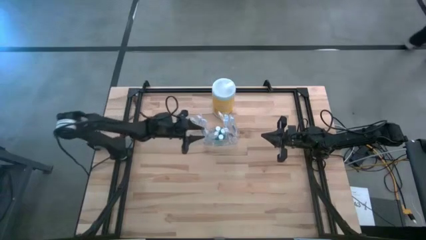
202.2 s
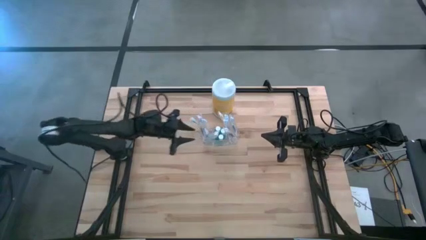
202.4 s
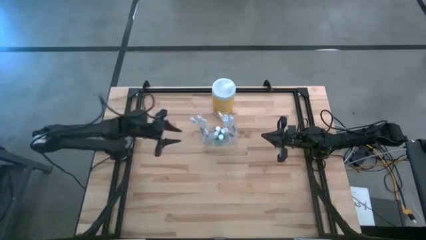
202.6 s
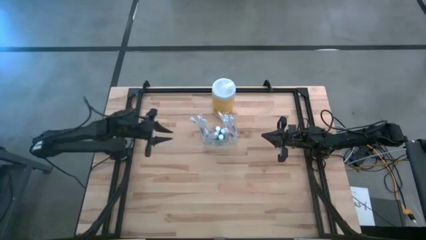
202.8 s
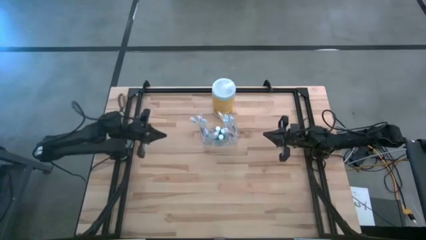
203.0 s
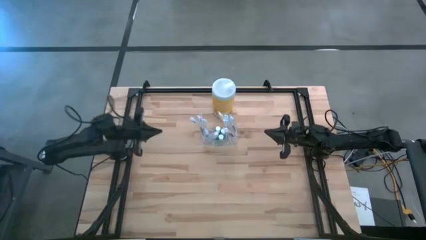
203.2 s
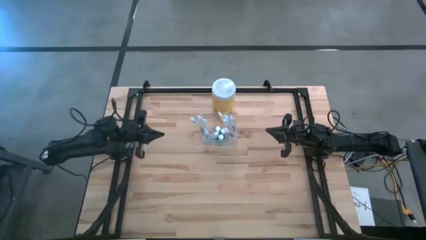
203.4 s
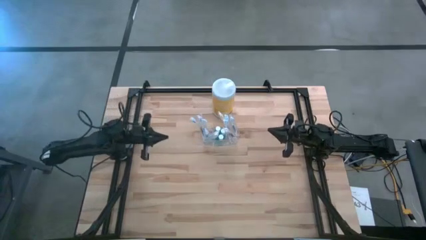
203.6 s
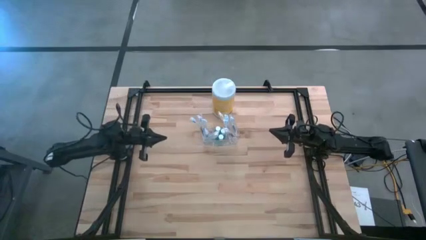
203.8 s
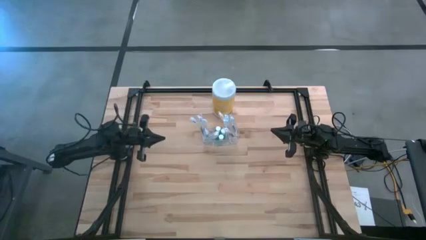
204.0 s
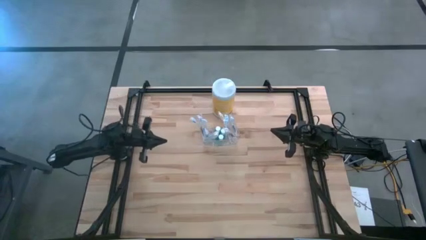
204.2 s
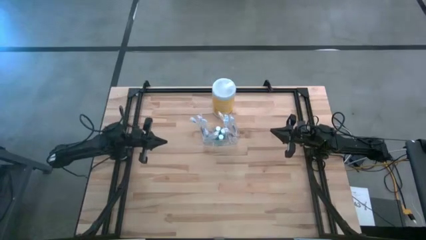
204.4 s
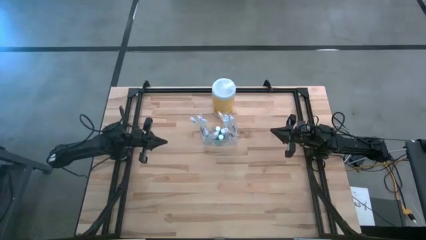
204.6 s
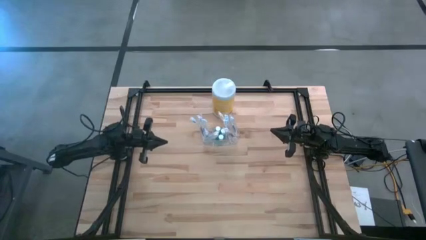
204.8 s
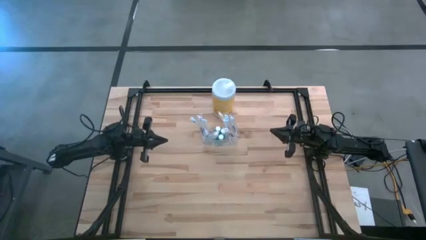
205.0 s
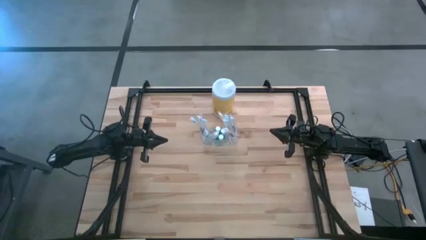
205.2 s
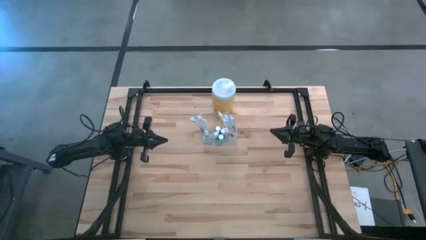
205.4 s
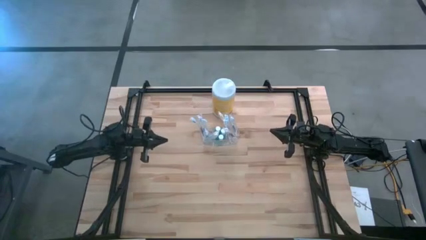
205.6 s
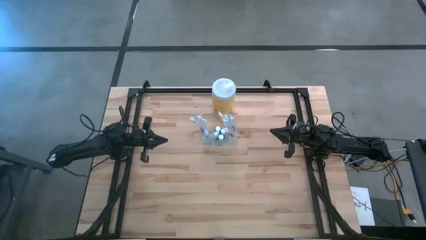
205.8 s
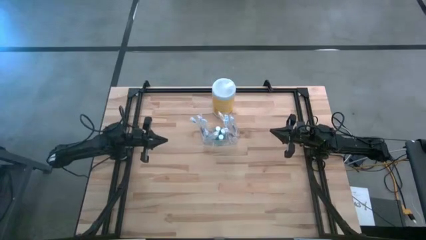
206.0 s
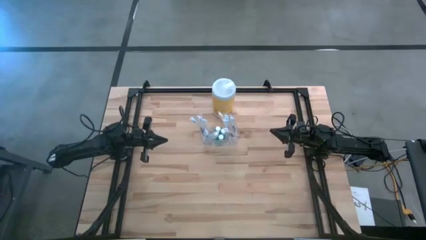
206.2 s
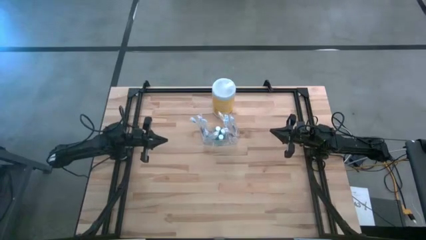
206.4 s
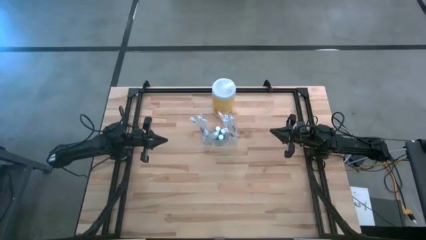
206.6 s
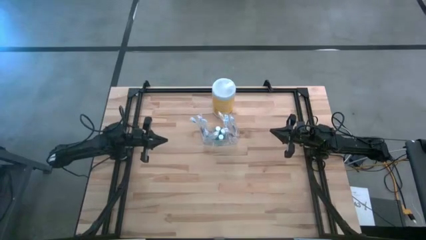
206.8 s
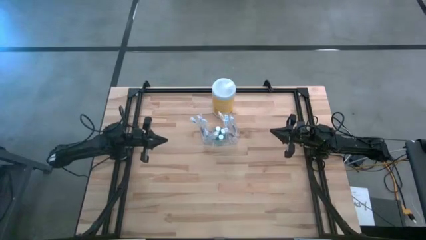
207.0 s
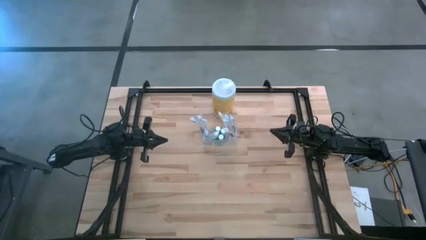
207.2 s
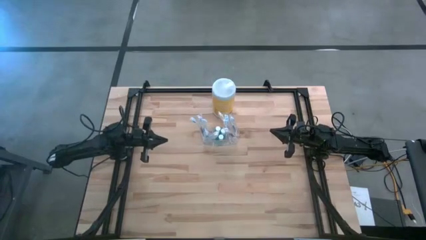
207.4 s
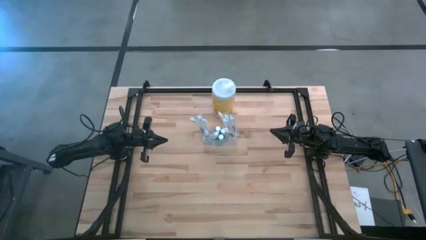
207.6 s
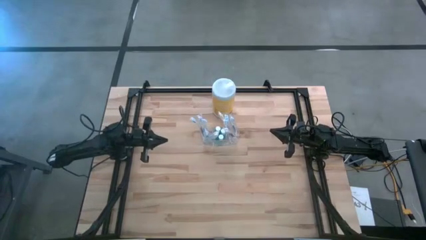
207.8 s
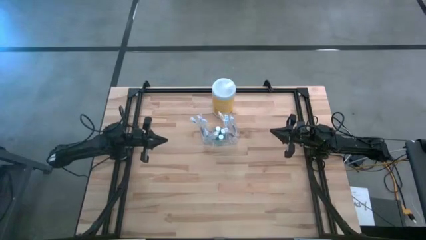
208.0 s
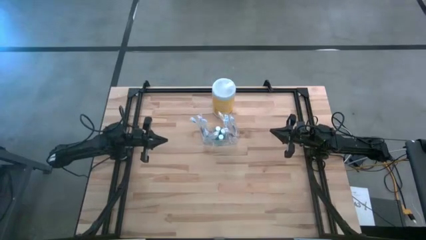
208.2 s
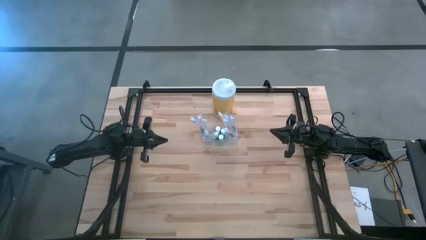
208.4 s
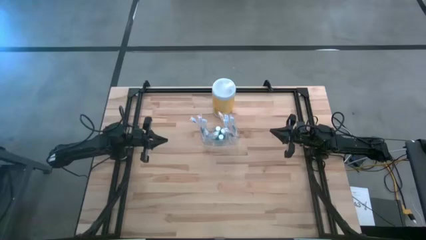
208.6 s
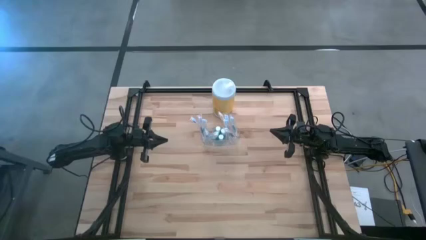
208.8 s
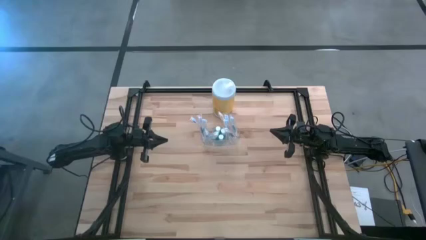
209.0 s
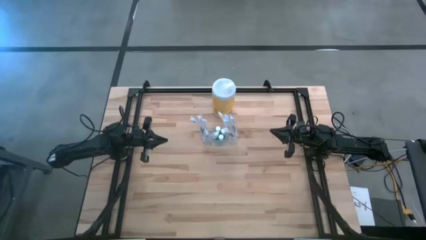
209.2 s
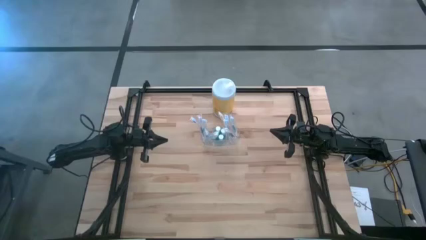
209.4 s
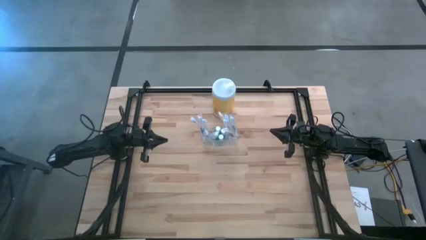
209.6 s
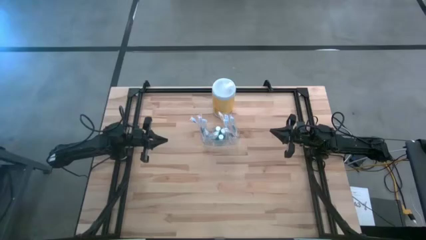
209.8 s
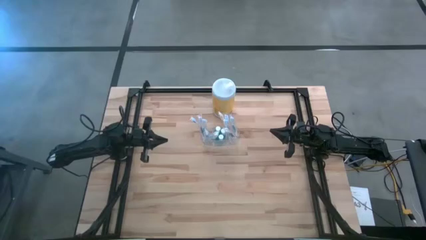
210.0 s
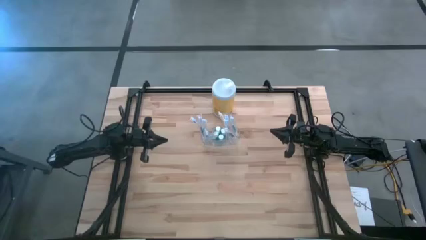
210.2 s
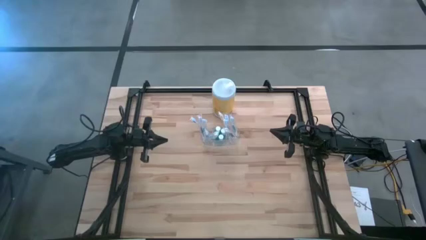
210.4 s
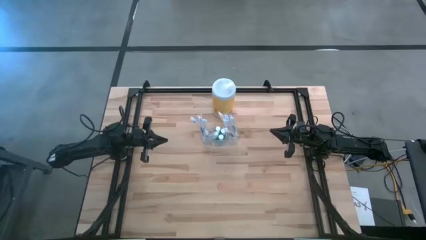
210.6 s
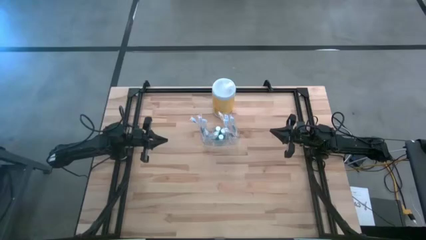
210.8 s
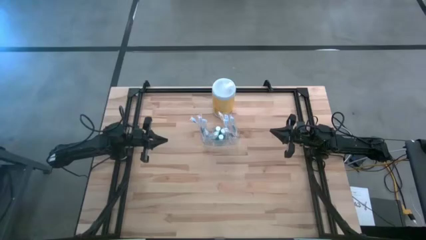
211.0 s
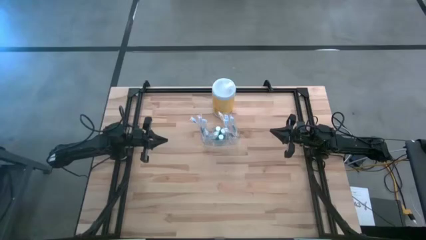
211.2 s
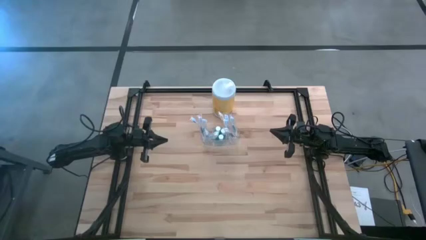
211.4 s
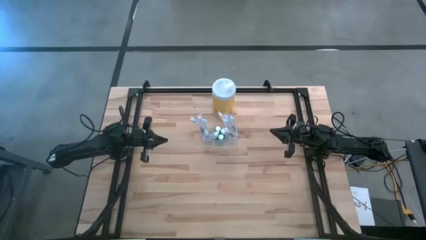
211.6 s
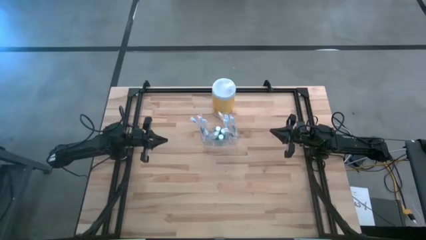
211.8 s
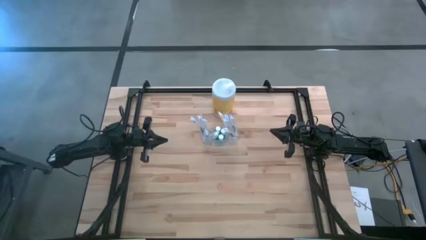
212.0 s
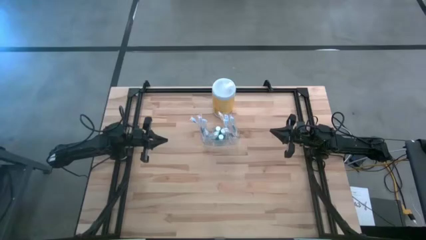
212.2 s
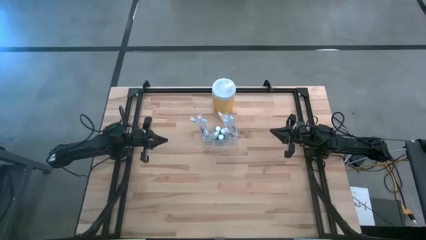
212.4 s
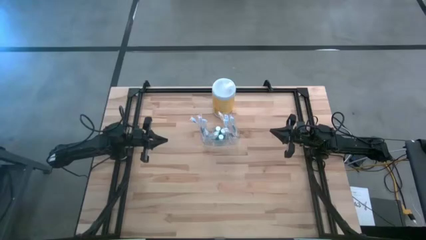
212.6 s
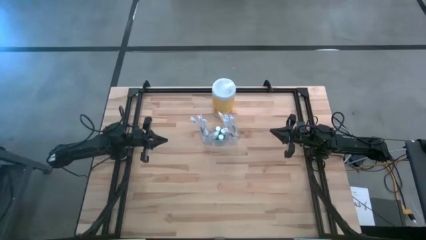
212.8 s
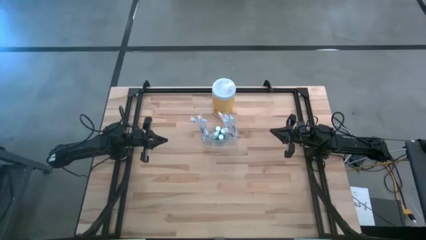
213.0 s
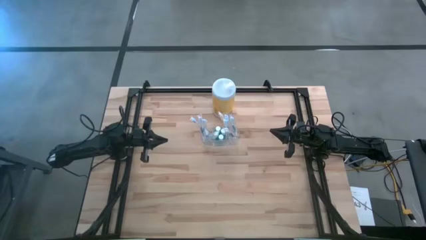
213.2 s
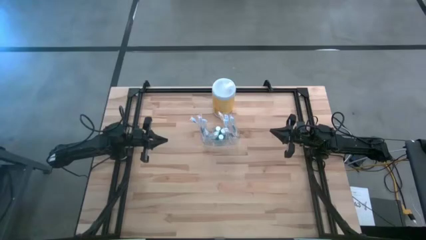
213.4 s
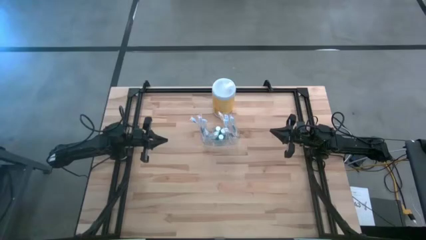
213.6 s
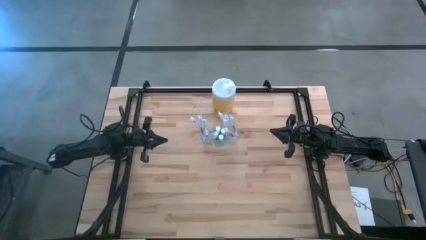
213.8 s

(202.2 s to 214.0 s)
Task: Pick & Place toothbrushing station
Return to Home Position

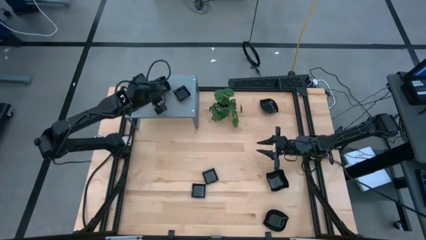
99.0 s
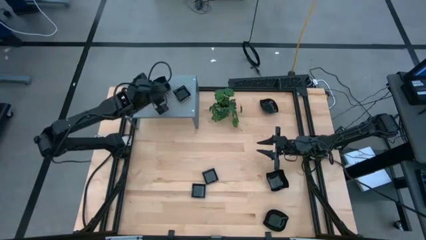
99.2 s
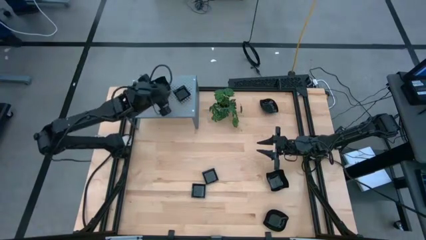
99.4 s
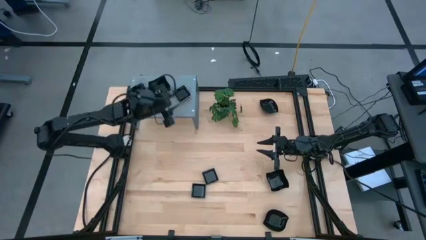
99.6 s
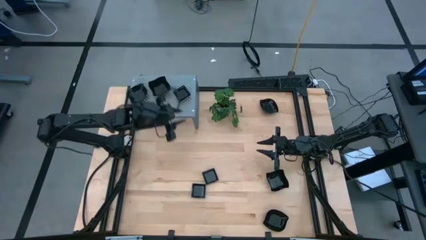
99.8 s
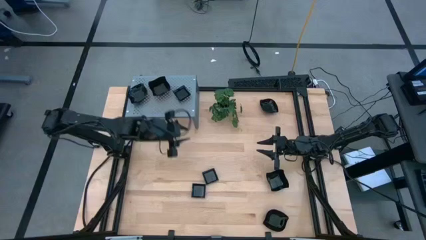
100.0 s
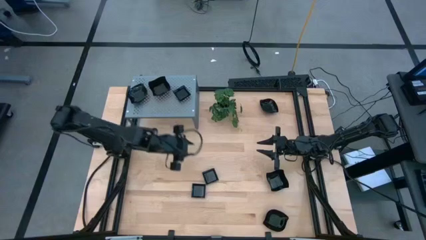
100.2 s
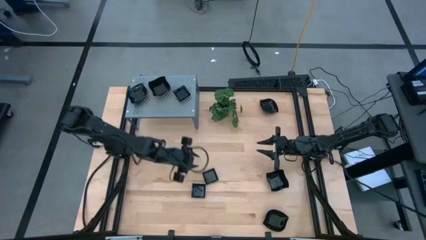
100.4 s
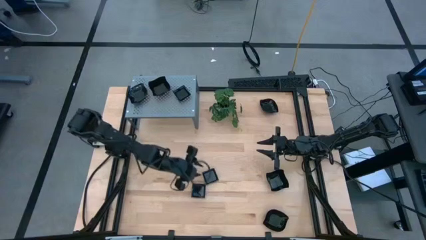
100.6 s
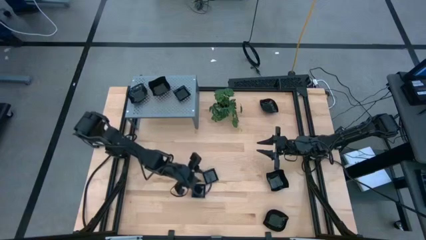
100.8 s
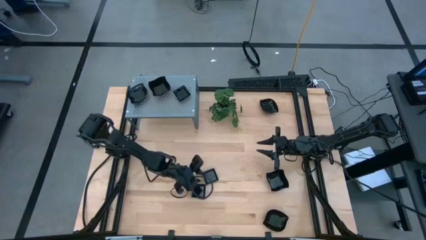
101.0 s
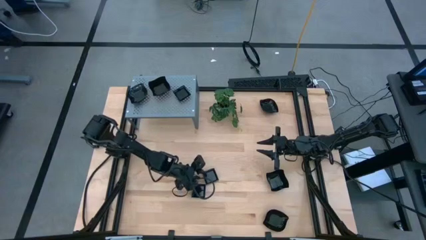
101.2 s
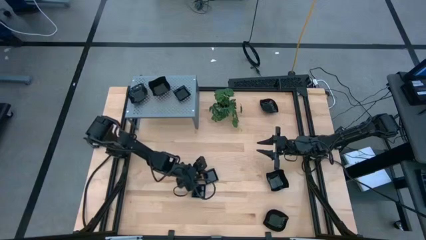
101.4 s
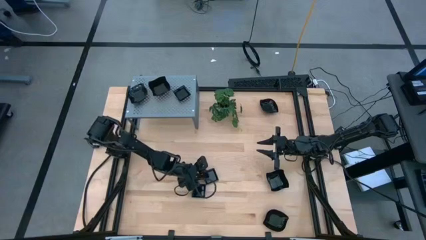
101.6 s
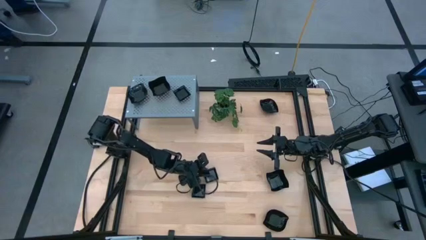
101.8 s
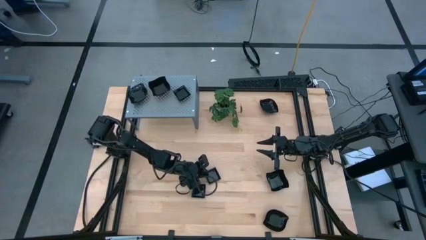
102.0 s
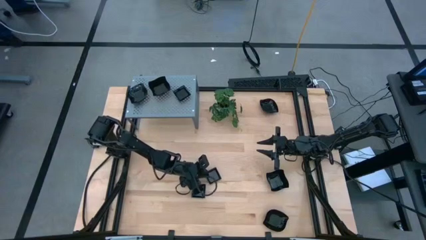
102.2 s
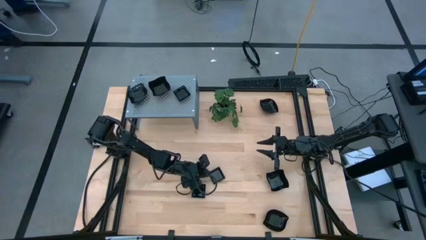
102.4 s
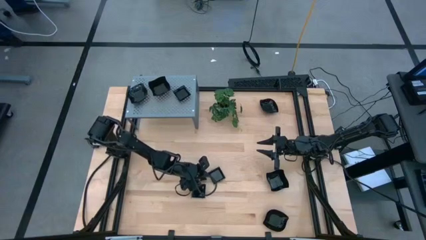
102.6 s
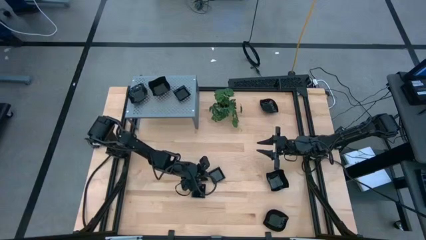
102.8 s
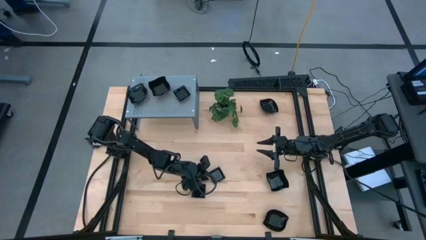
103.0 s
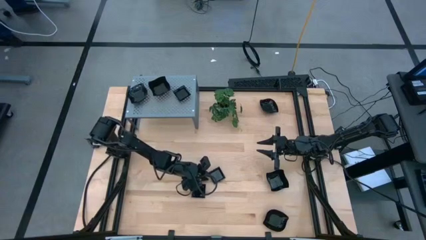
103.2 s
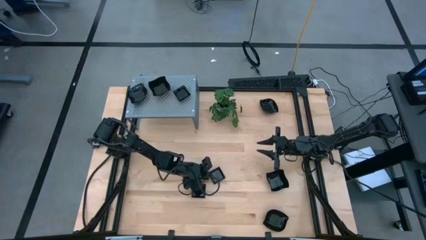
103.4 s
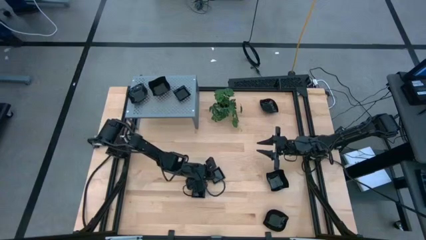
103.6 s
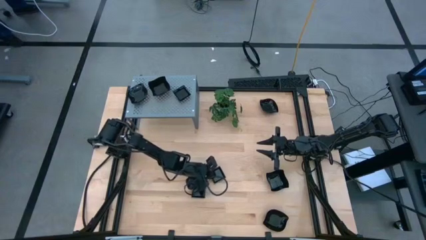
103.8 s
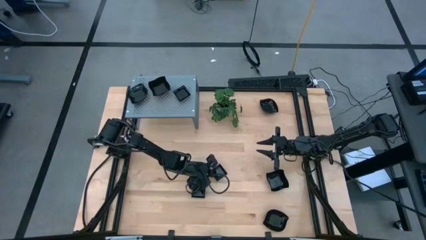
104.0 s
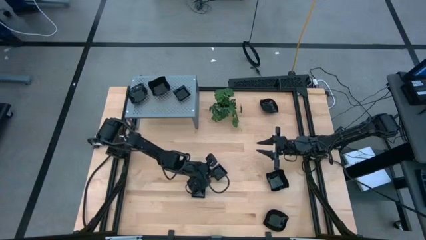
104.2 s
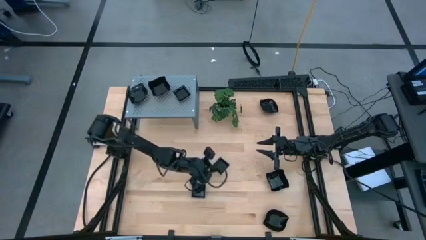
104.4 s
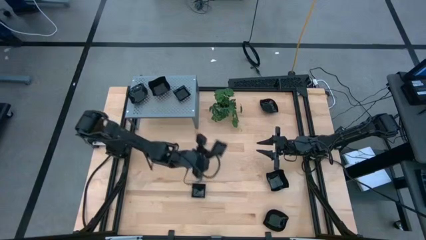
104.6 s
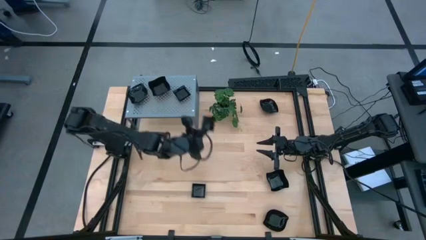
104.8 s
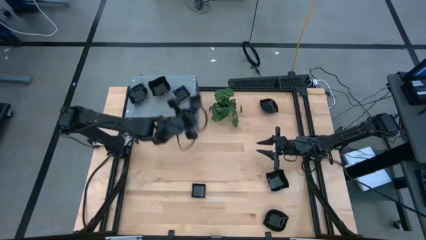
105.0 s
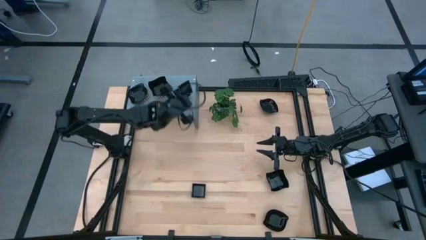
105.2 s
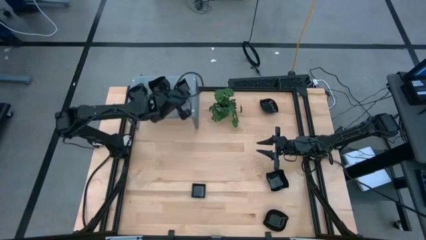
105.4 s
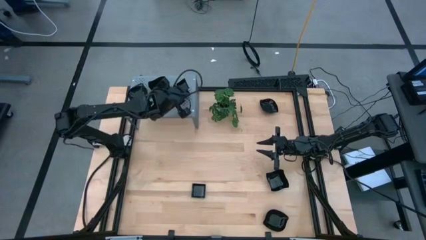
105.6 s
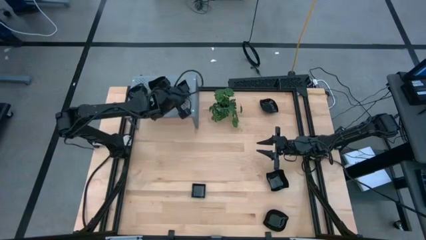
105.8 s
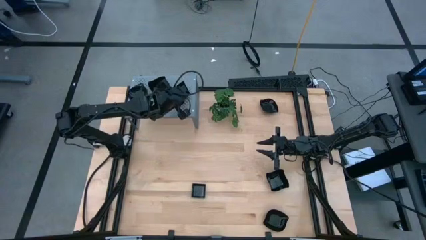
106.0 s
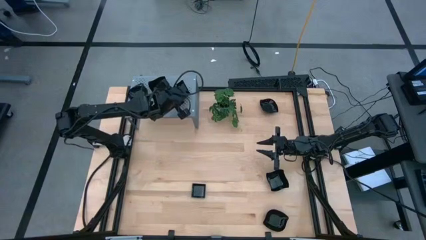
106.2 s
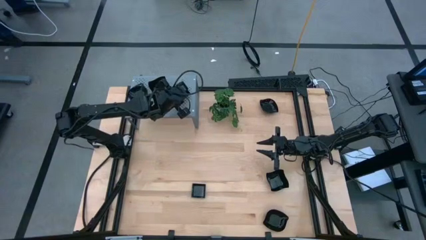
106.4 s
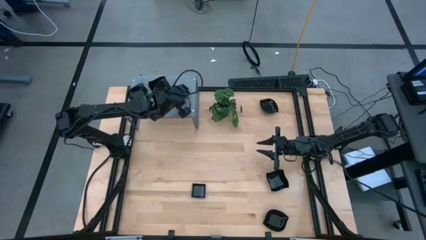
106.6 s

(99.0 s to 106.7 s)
Task: Pick & Place Mini shaped plates
Stack the black square plate on top of the black square plate on the shelf
